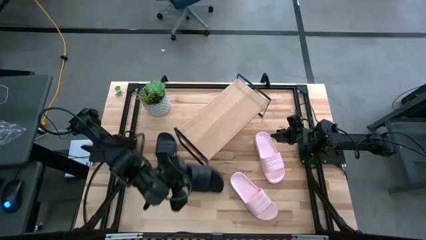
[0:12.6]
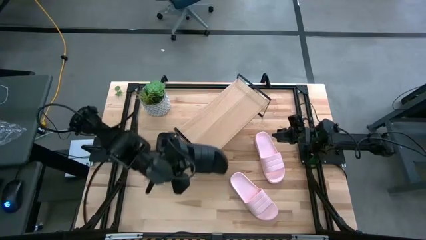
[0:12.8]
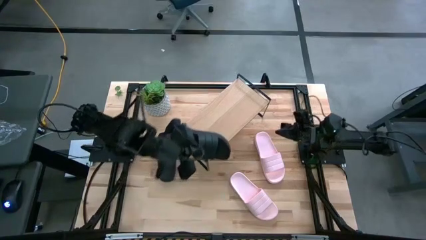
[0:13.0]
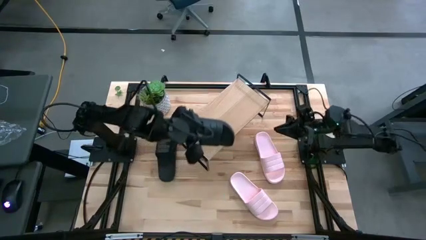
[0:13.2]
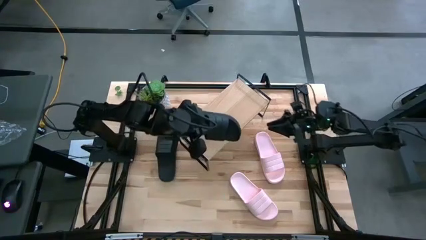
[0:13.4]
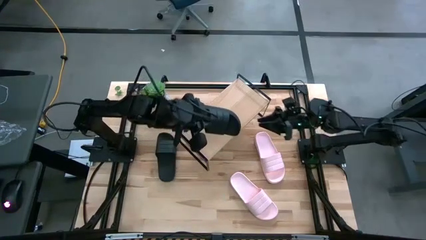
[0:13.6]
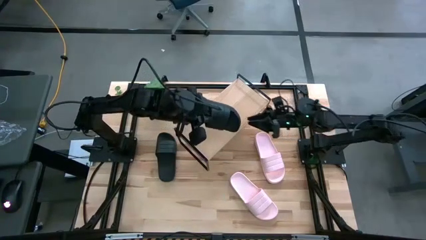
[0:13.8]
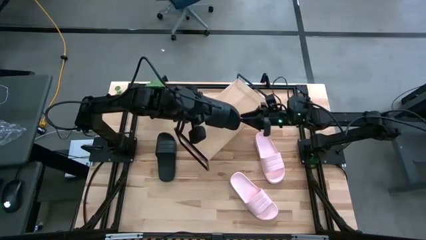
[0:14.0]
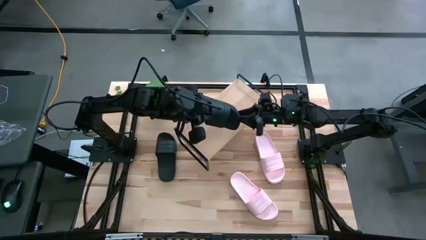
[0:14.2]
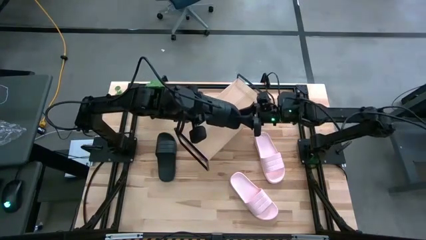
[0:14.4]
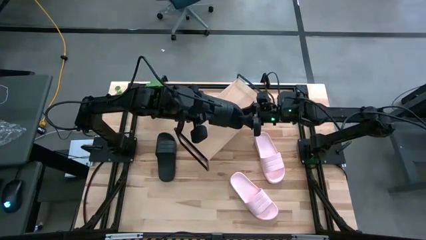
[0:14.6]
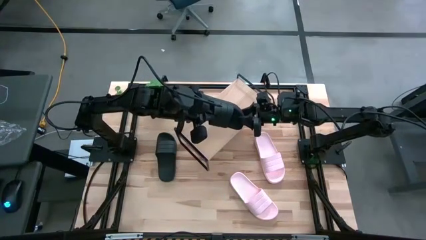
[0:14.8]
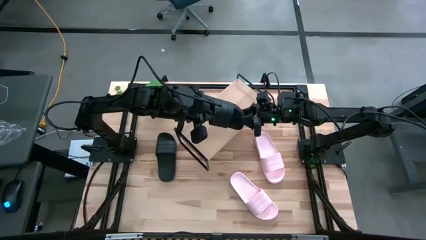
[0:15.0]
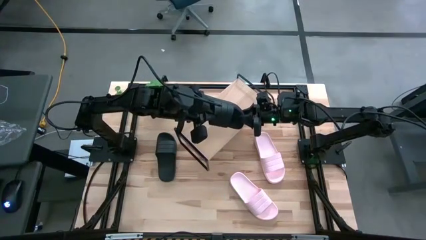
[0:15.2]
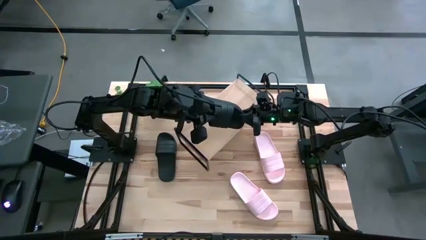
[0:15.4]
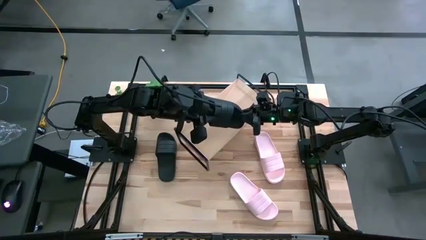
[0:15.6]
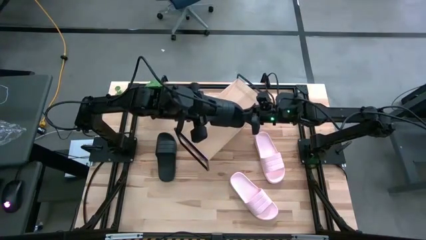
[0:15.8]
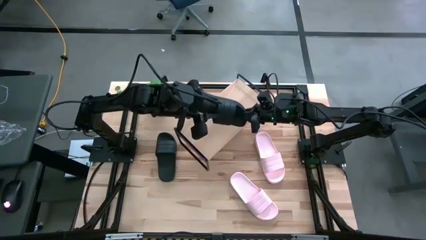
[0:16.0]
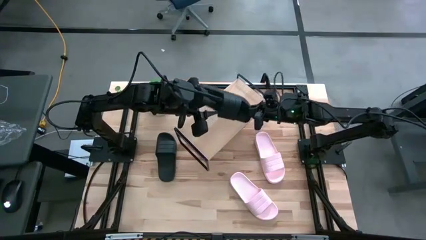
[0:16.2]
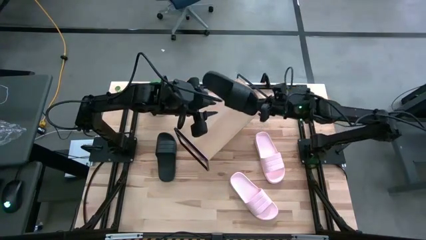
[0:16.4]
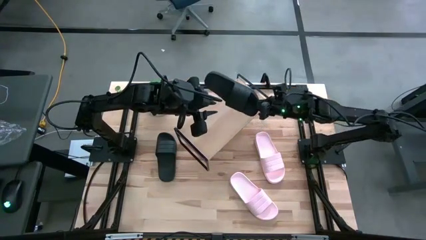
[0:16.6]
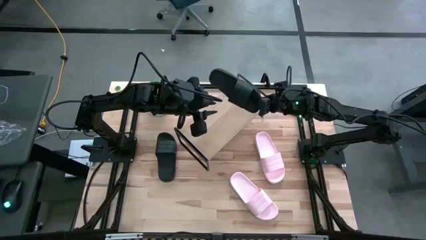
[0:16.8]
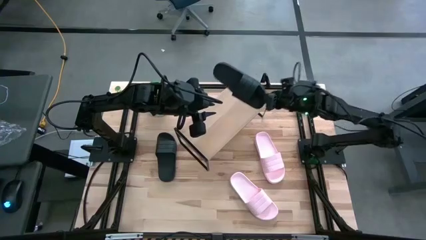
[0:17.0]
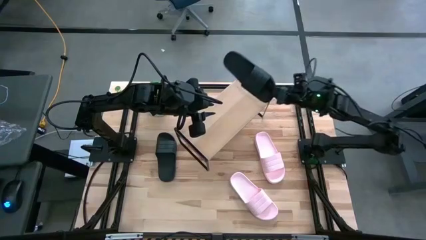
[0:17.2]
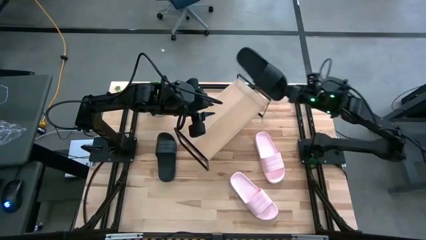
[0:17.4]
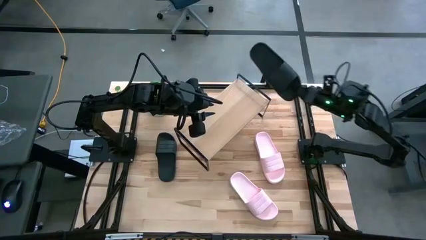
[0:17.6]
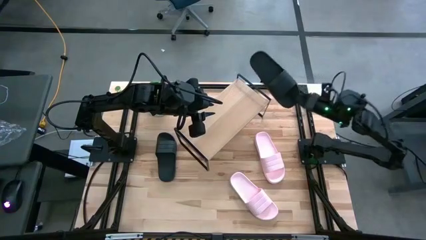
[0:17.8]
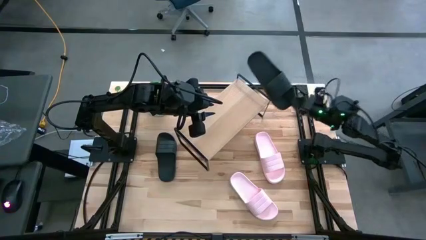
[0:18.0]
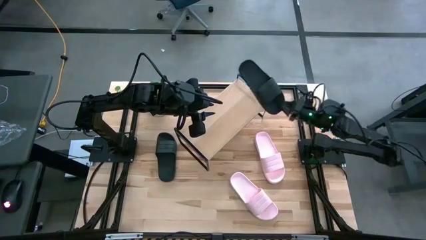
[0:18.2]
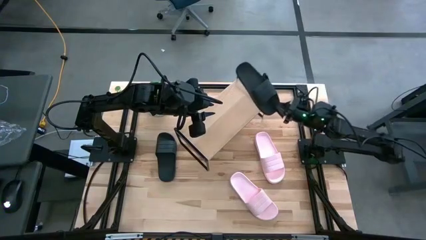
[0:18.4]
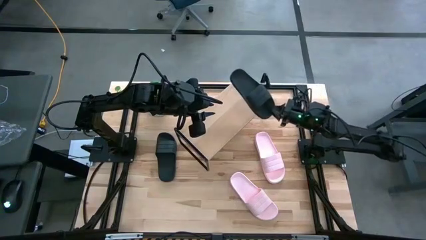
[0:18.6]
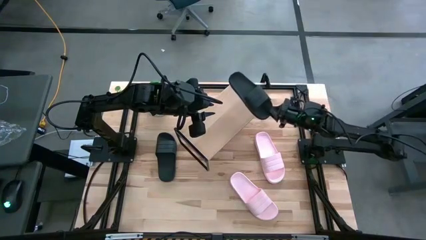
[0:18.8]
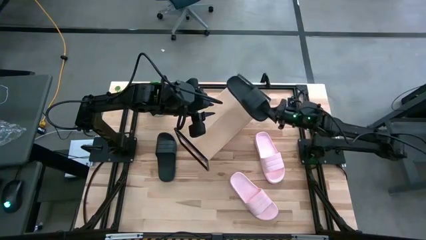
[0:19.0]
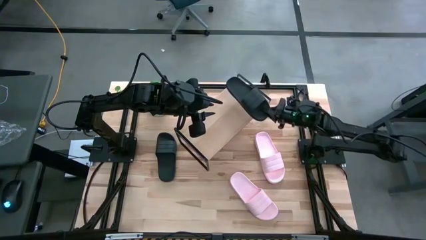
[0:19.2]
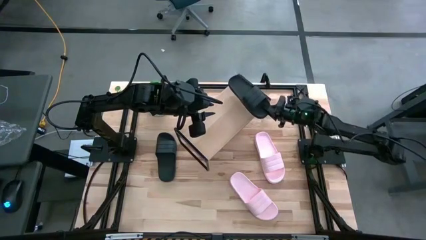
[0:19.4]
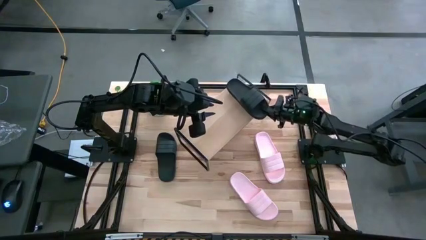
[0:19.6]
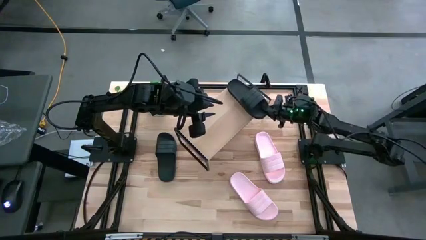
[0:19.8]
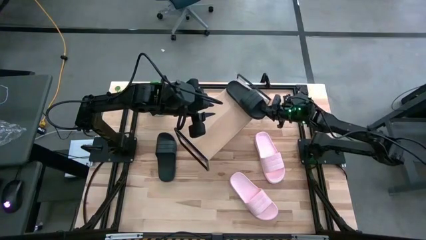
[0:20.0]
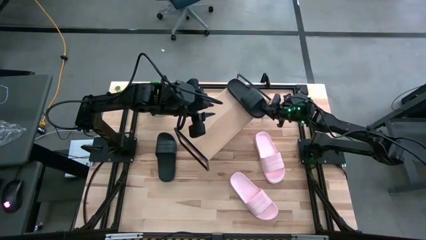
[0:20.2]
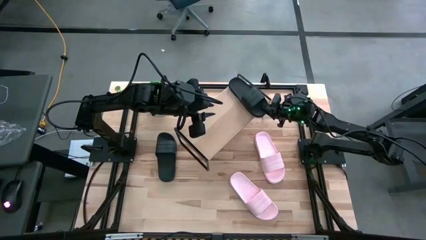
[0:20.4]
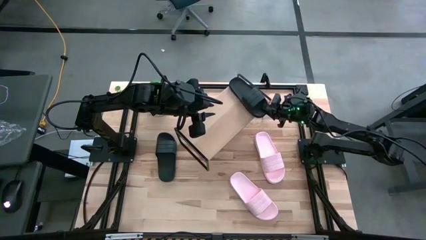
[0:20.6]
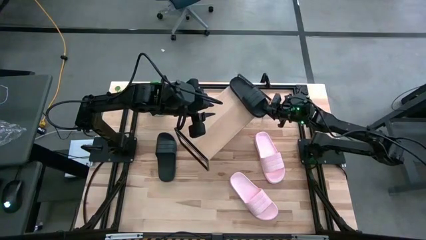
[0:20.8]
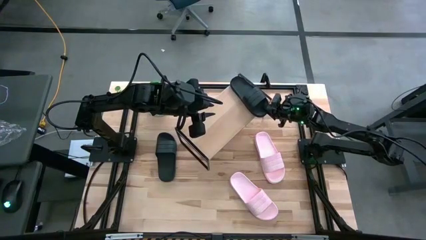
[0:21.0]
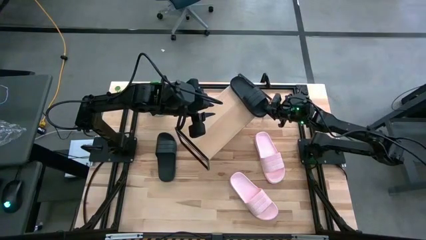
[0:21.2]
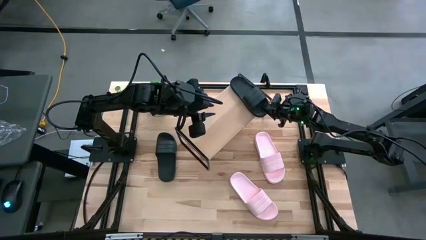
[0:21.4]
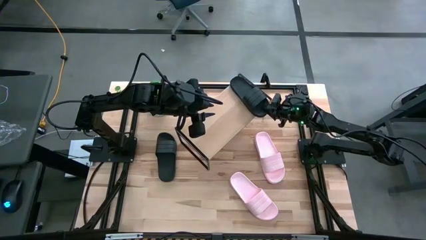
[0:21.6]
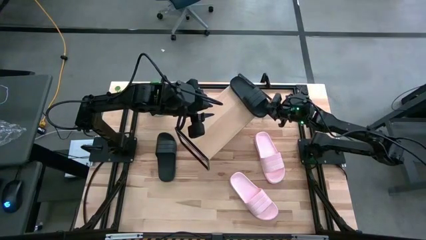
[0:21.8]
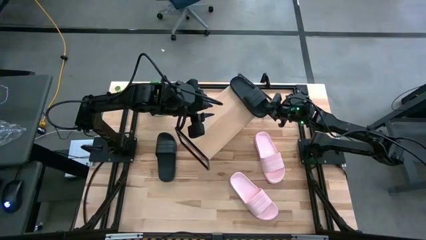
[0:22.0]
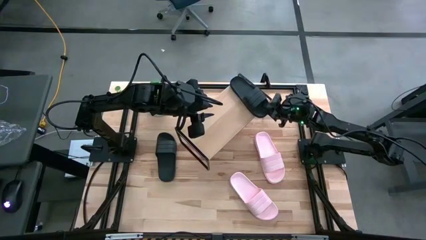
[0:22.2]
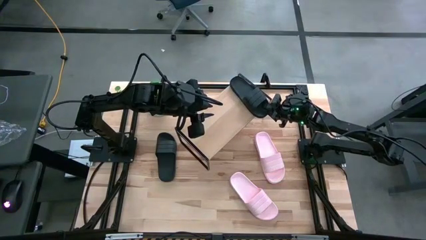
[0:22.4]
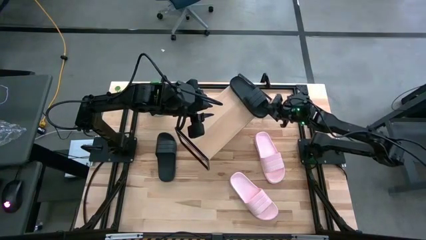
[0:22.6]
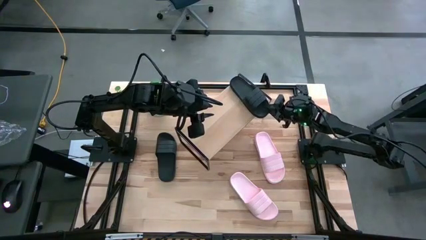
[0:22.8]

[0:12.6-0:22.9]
Task: Pick and place slides into the shelf
Put the bottom black slide on the shelf

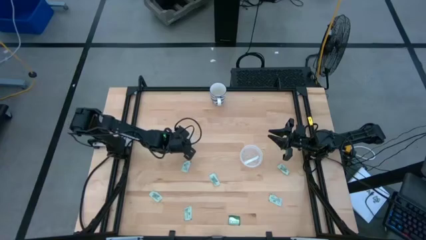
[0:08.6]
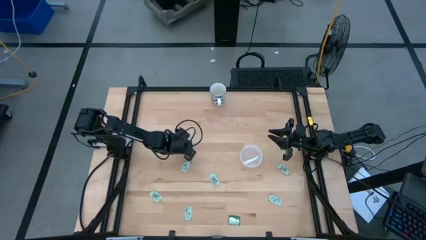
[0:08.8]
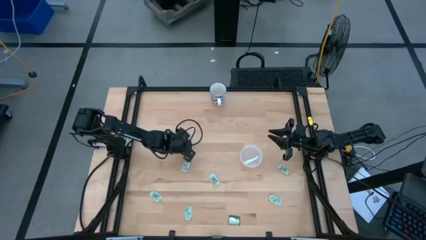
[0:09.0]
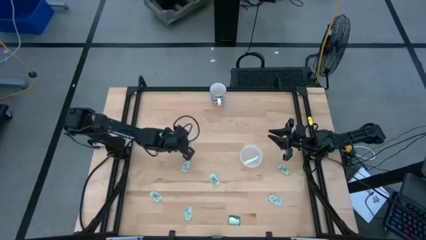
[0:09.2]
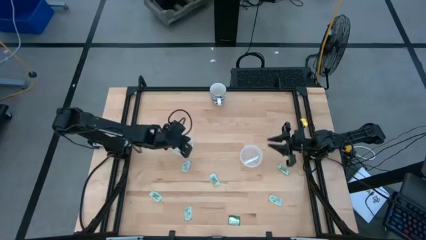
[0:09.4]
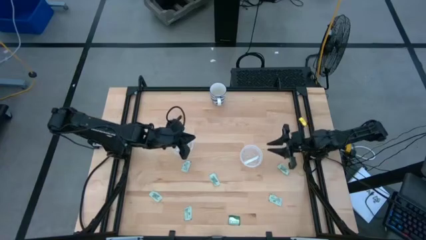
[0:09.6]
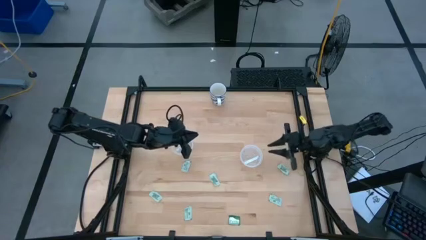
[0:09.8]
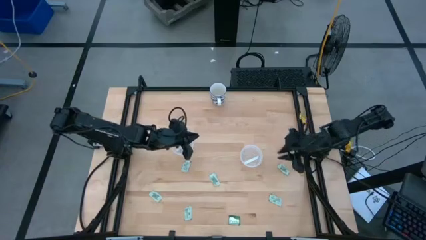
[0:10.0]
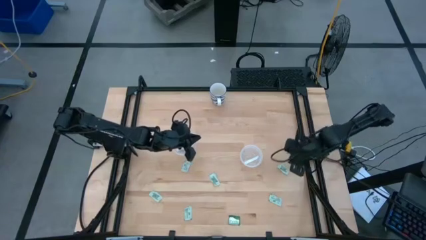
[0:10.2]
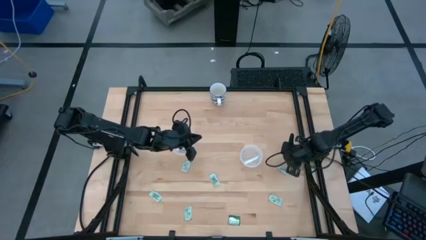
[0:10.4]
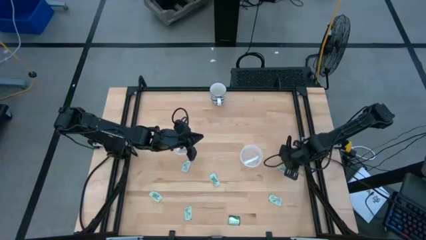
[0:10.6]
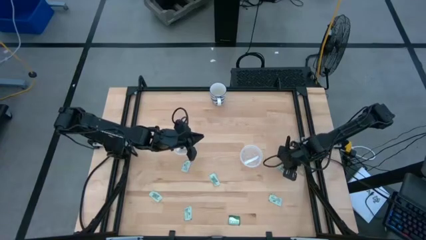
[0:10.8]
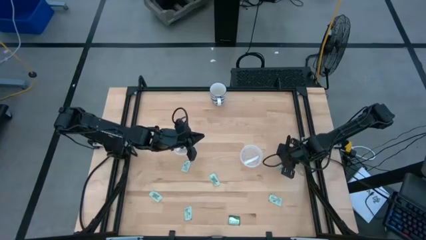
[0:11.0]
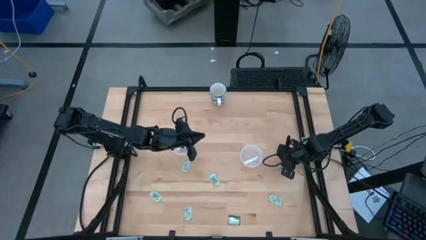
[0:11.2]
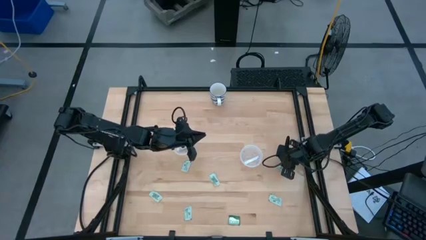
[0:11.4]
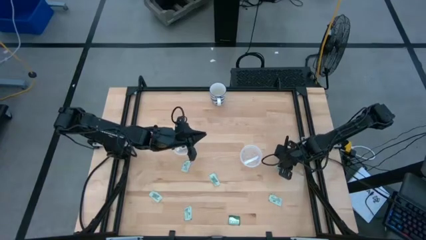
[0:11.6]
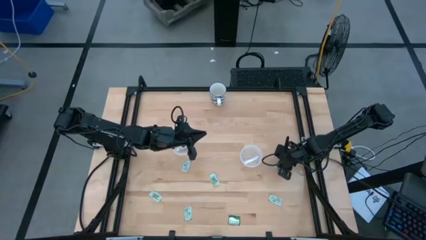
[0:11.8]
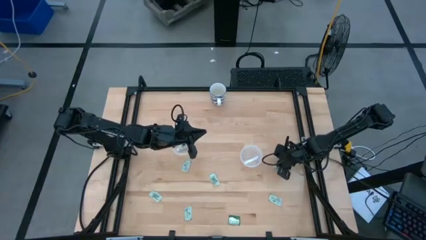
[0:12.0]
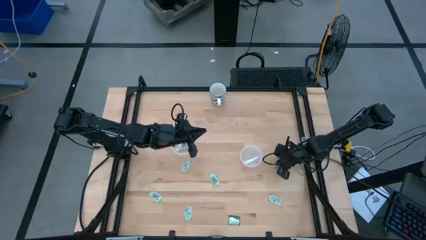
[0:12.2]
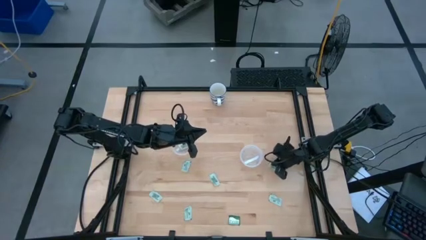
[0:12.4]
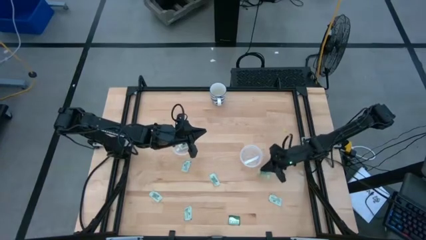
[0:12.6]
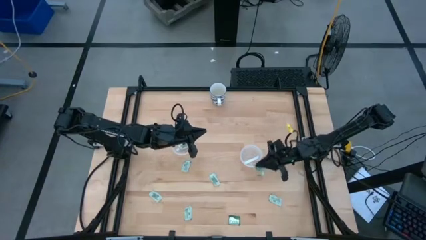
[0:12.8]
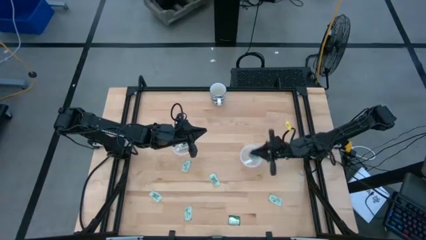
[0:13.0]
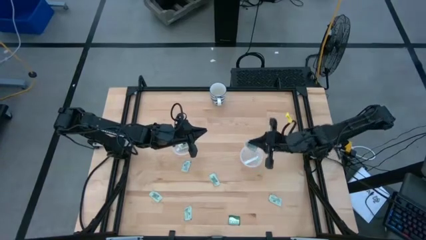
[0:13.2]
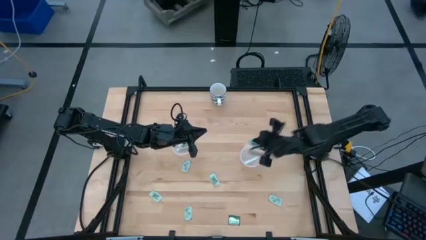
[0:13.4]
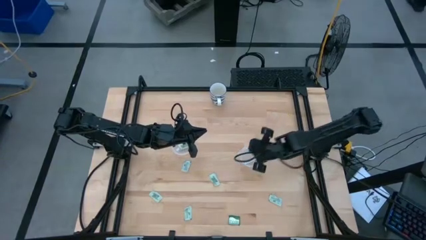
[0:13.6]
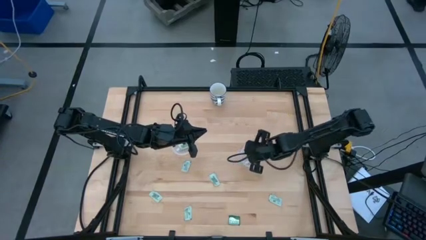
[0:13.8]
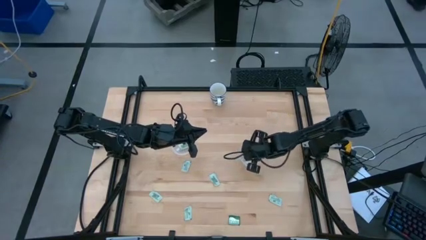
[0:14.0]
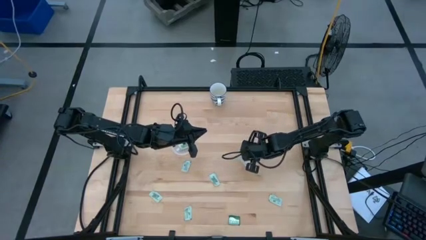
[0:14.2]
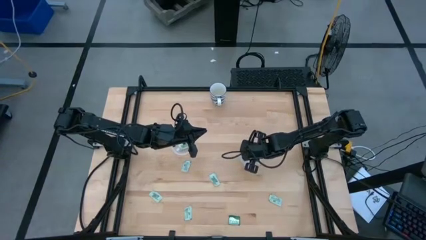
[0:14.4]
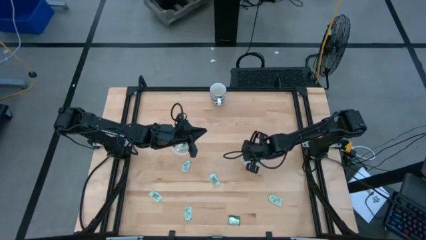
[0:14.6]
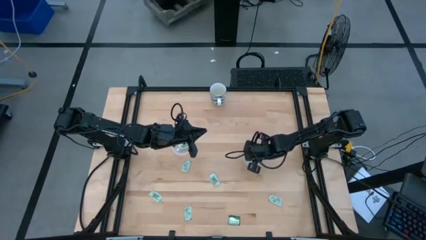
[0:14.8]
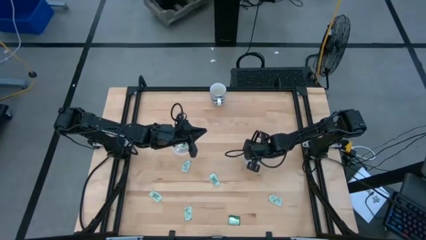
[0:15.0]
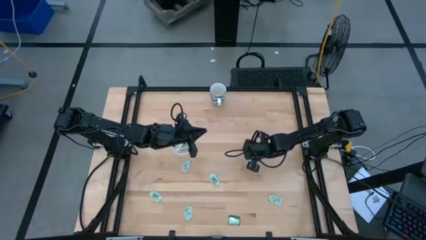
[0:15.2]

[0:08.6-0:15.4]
Task: Pick and place Stevia / Truvia into bins
Put the light green stevia packet into the right transparent container
